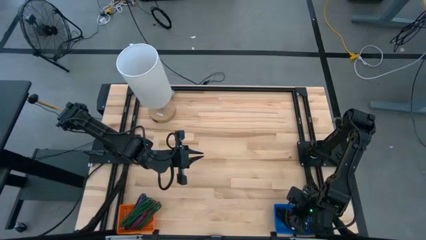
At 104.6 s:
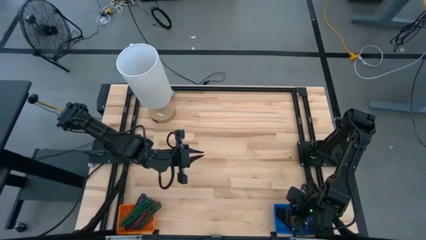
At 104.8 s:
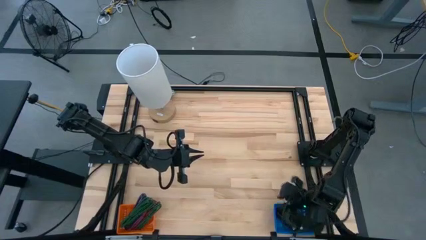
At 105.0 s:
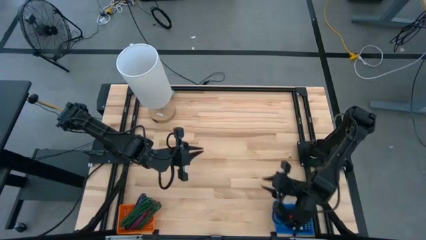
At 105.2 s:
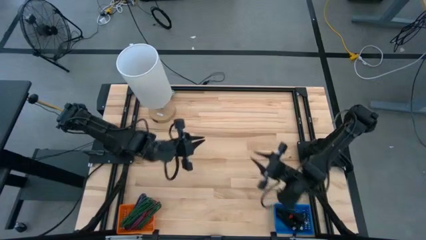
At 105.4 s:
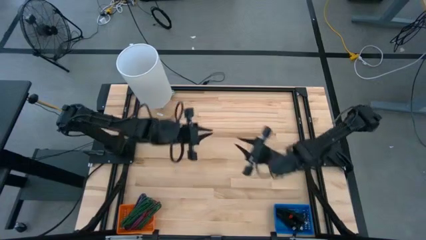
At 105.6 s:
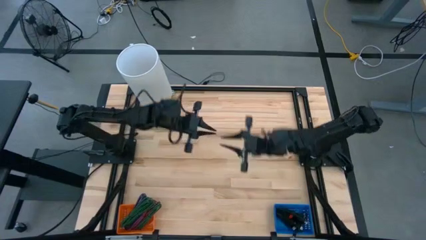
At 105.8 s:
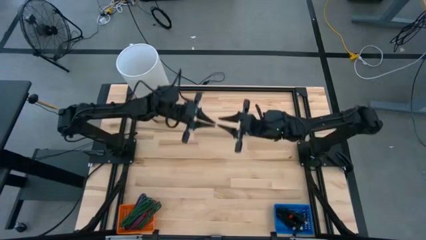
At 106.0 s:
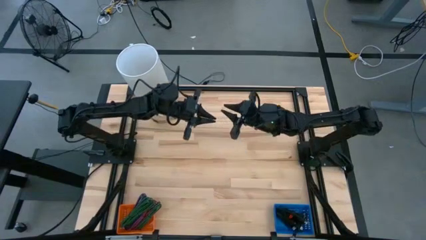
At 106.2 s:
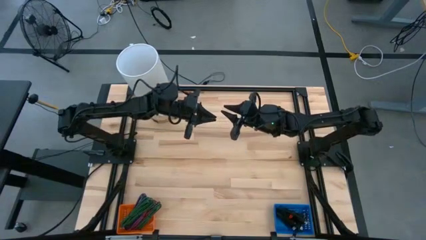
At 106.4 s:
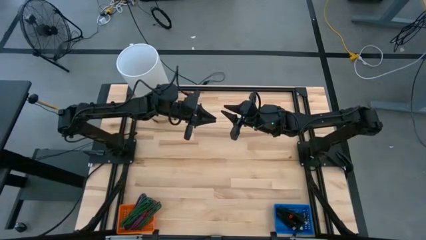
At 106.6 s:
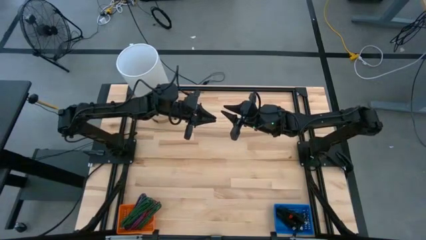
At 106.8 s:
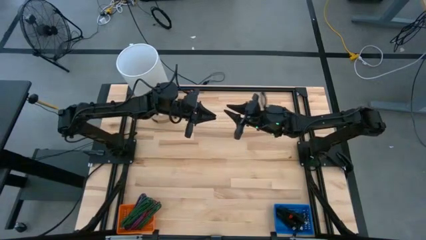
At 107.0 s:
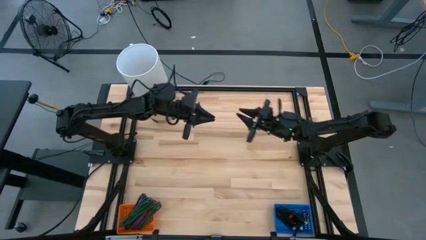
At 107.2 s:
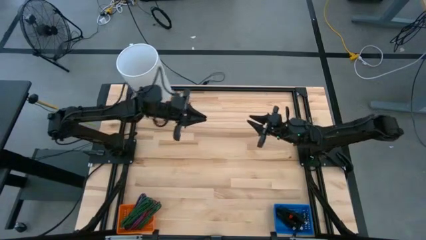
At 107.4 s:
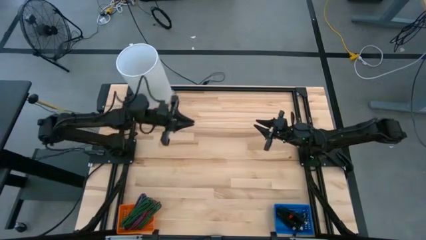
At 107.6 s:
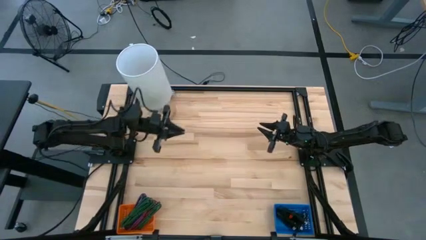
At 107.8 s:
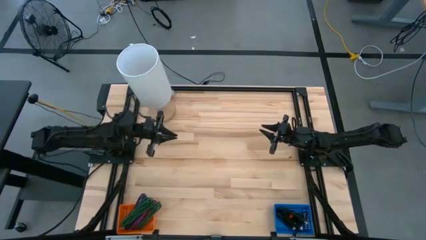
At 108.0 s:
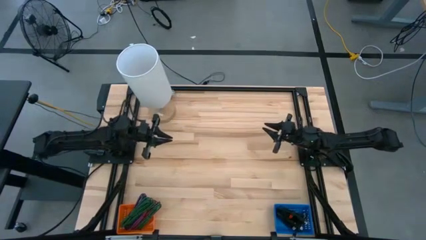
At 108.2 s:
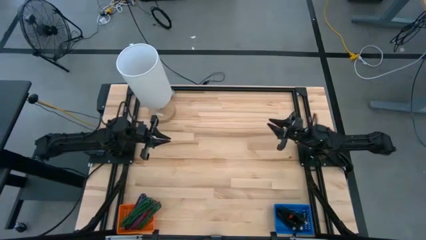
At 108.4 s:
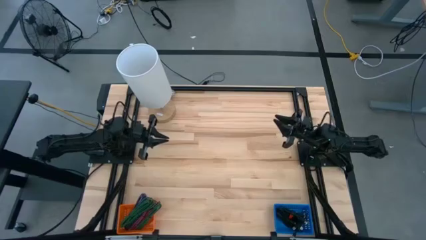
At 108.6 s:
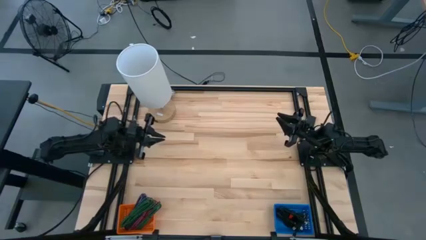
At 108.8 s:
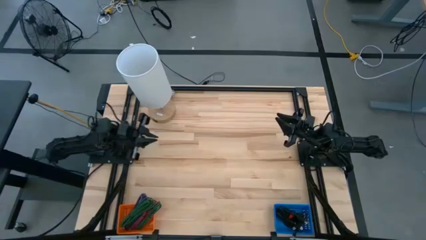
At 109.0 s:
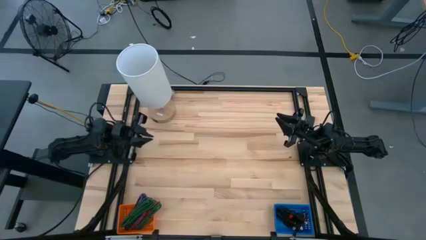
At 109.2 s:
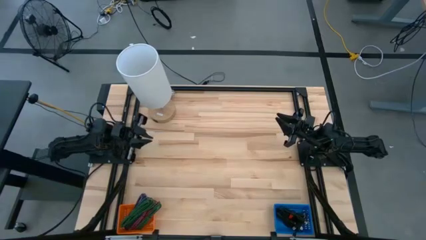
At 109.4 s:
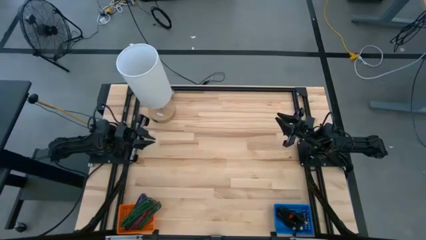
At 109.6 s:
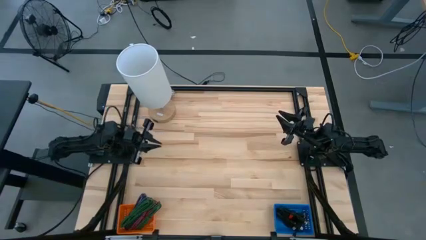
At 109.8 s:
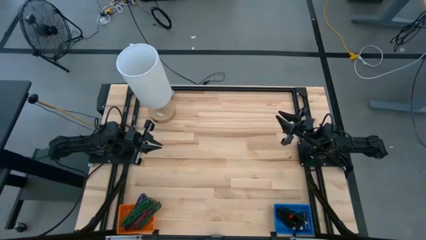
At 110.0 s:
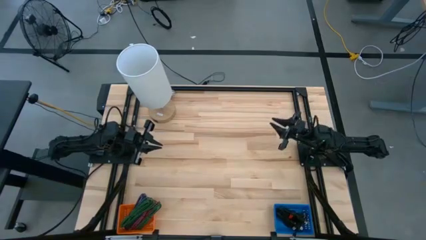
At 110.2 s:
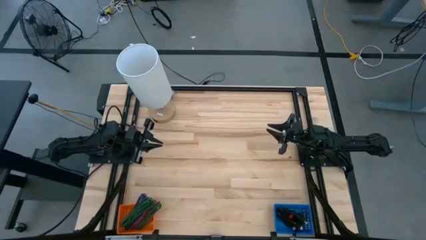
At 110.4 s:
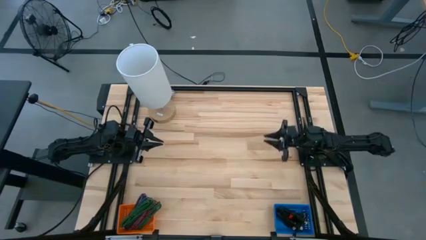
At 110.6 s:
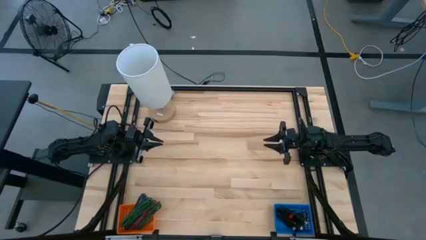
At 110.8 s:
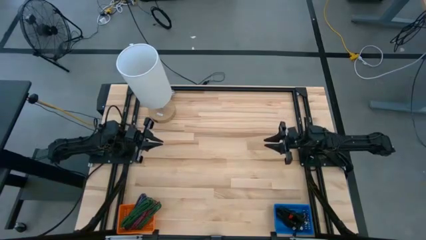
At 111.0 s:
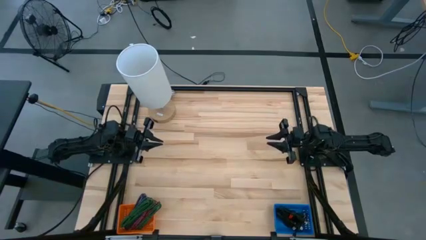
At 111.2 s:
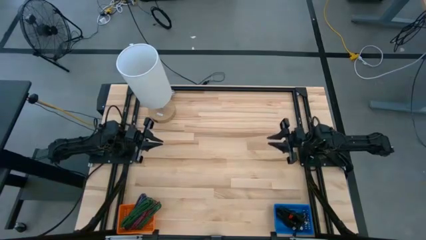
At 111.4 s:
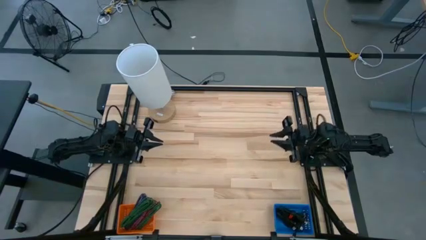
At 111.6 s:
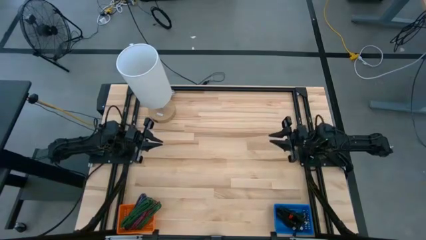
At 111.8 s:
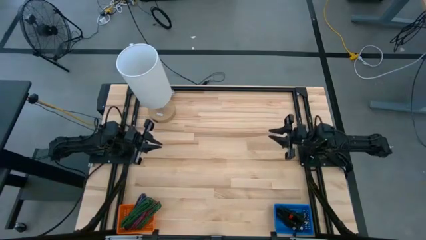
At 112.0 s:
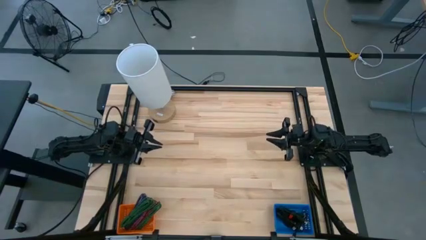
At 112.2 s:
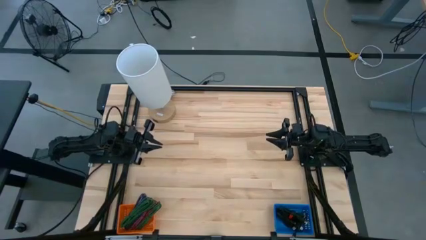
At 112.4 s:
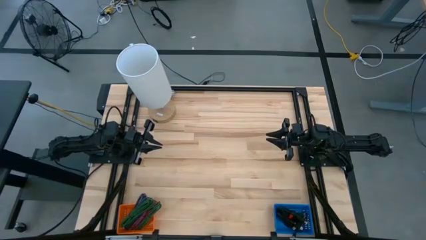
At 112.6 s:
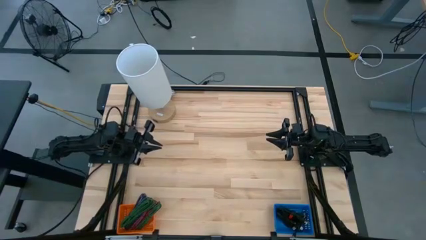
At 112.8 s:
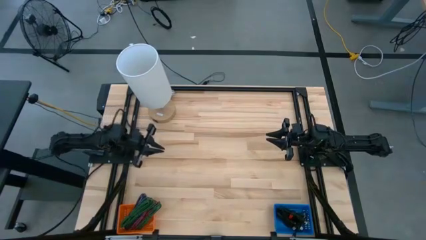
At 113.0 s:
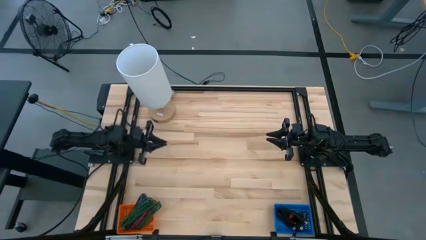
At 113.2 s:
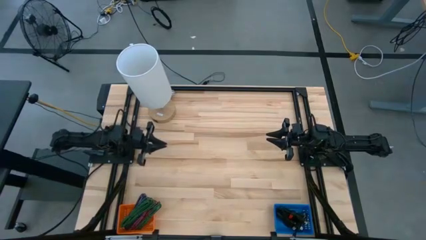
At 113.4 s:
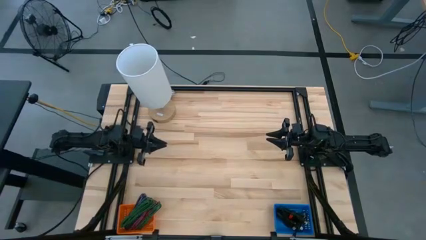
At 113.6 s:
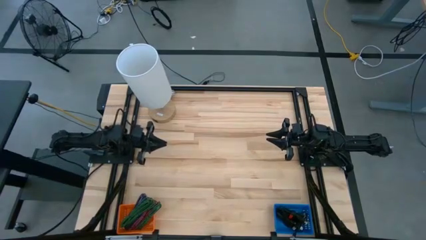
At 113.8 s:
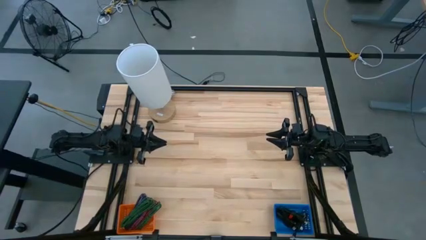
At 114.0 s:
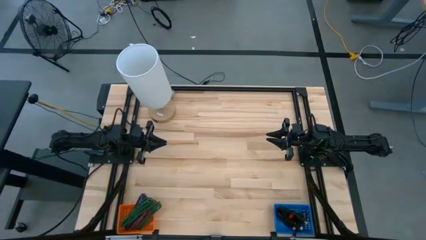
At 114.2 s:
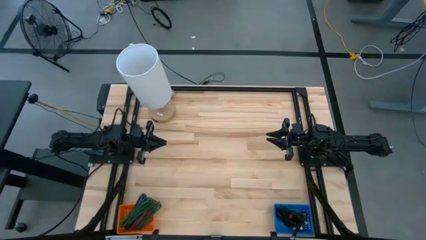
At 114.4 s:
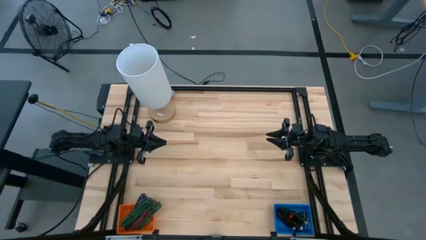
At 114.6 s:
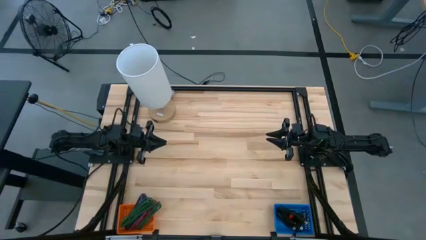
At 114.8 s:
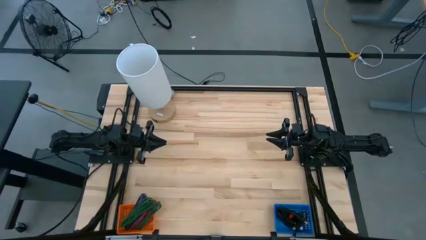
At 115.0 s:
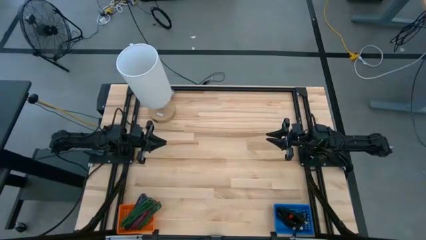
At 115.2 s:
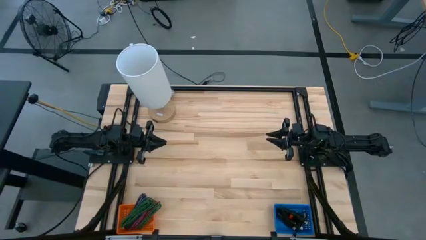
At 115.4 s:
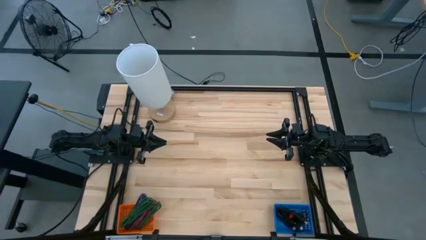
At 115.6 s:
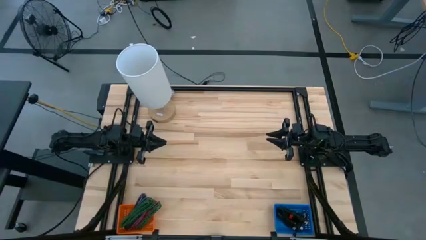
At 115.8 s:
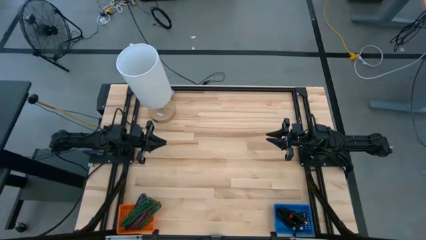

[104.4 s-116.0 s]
Task: Pick & Place USB Port
Return to home position

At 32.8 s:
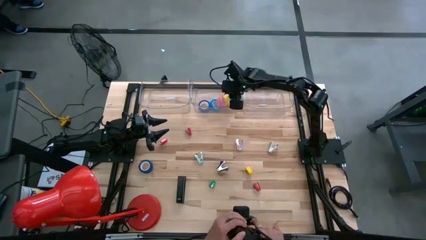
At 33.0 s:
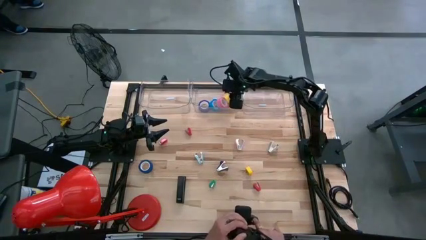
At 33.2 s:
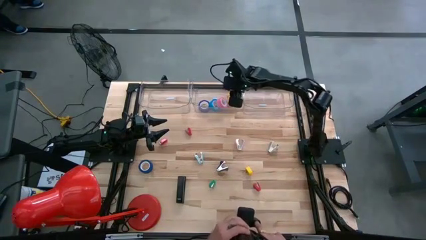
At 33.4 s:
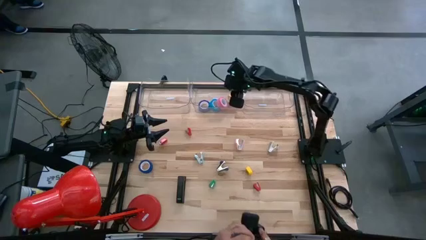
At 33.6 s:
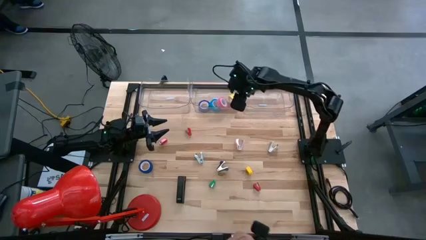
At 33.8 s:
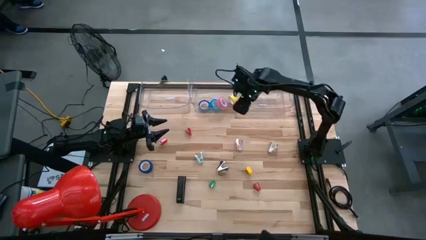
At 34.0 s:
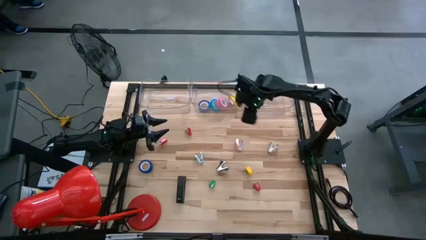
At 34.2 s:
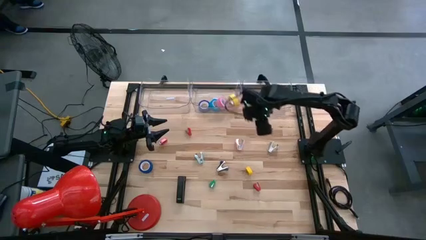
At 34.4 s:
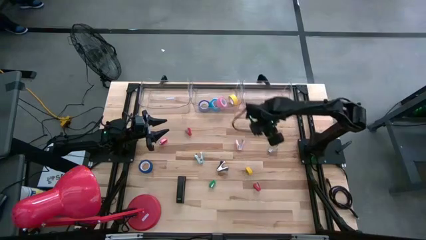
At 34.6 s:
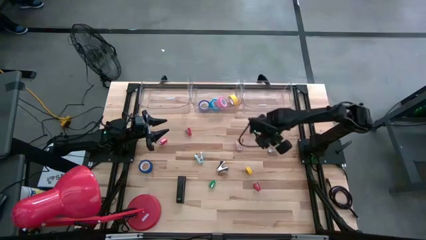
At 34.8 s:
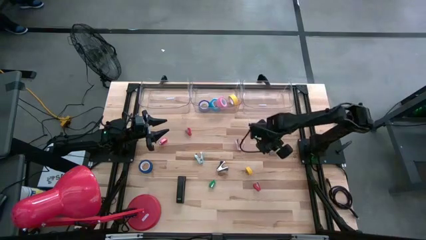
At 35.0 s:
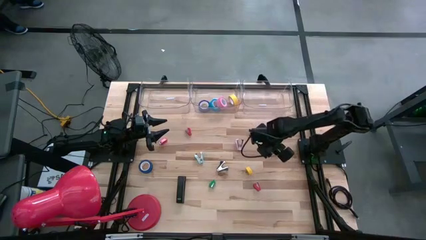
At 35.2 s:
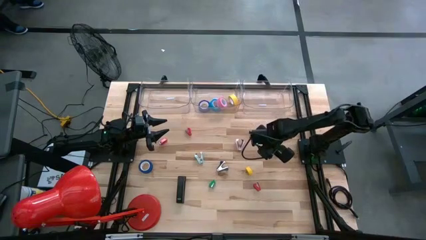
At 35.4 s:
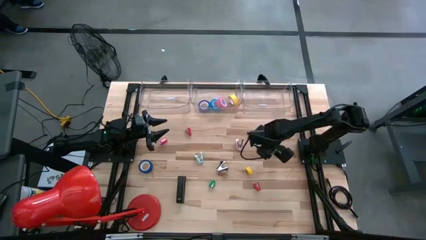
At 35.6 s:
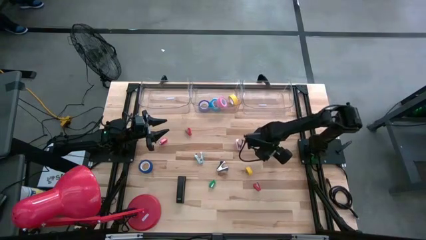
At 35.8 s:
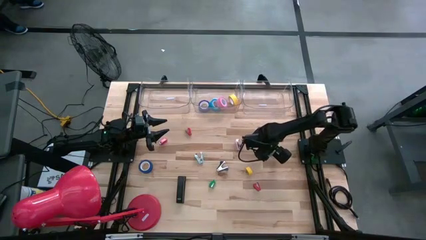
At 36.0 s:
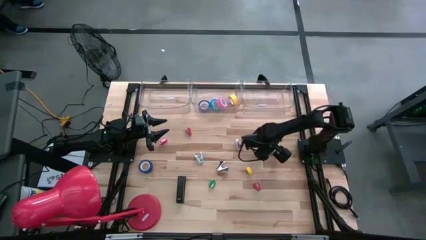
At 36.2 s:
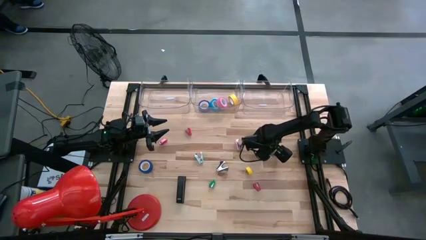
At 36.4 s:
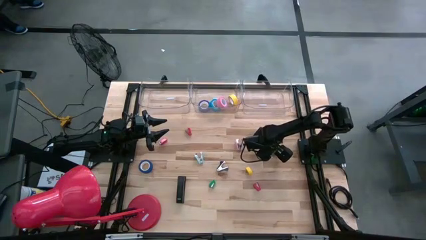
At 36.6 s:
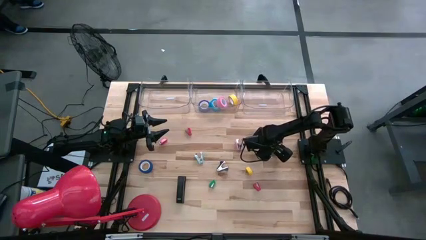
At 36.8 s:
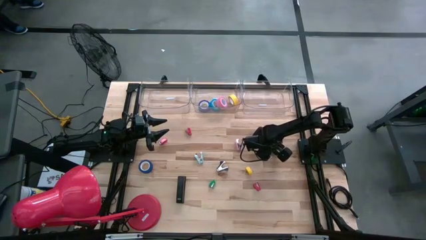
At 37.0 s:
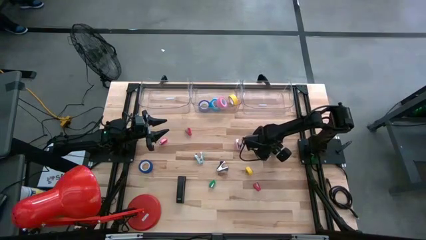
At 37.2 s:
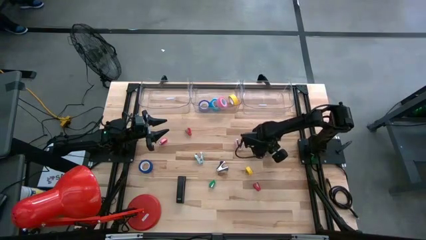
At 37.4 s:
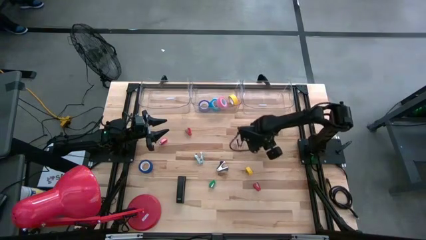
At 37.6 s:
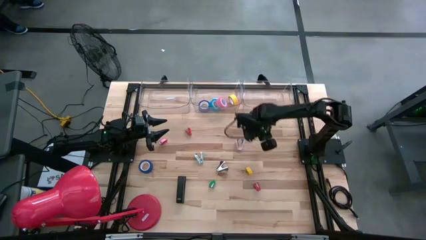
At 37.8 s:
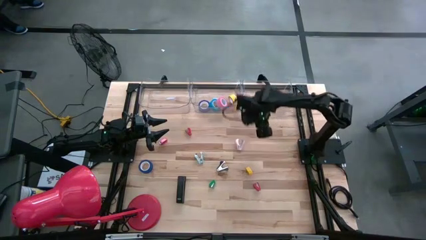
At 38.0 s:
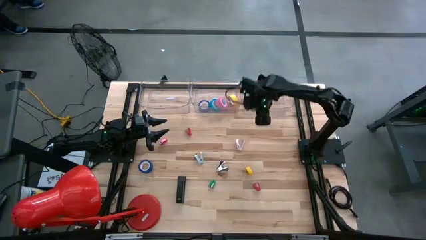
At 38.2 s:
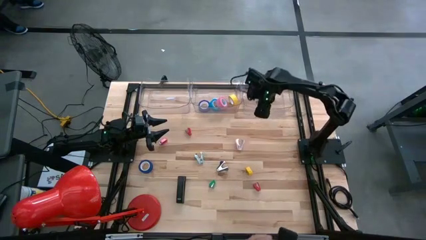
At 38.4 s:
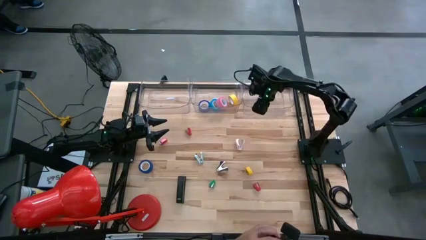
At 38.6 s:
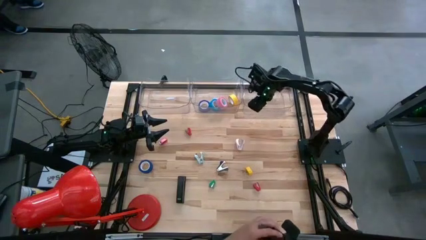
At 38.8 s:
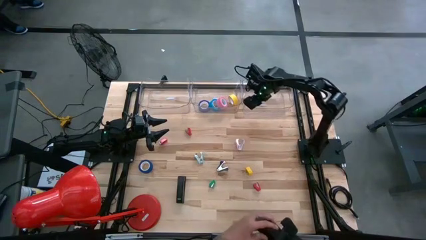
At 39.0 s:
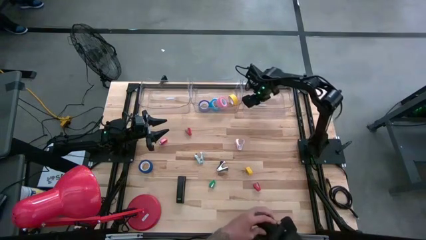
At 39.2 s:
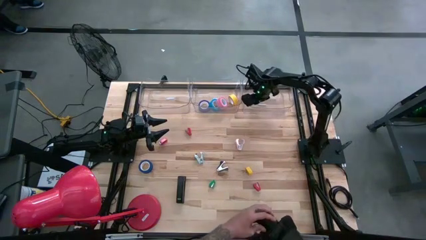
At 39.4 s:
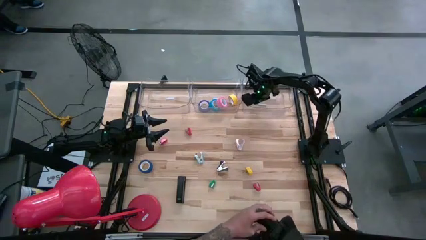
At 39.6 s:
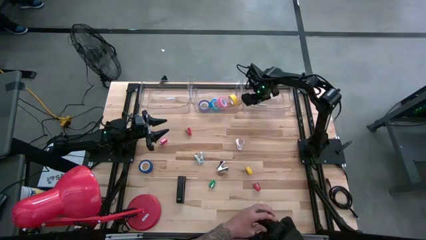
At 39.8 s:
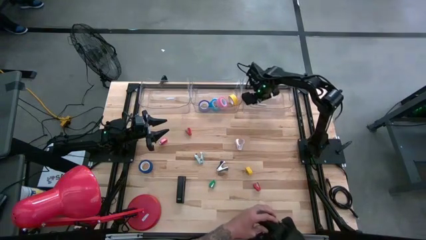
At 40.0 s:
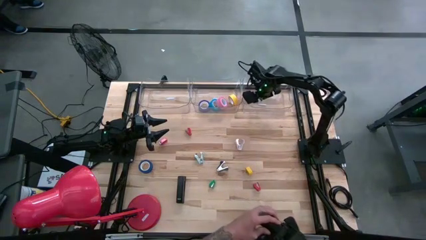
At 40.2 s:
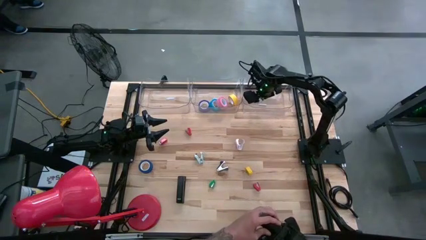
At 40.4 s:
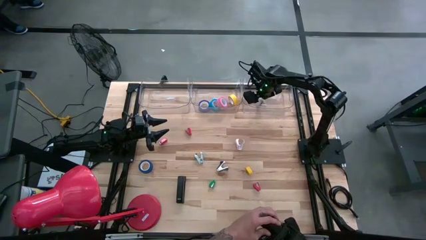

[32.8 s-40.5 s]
Task: Pick and place Stapler, Stapler remover, tape
Put the gray staple remover into the right transparent bin
